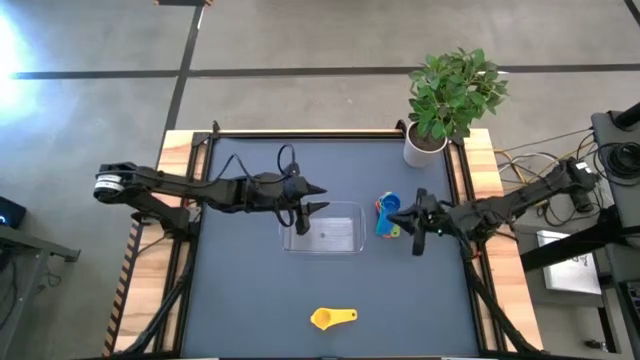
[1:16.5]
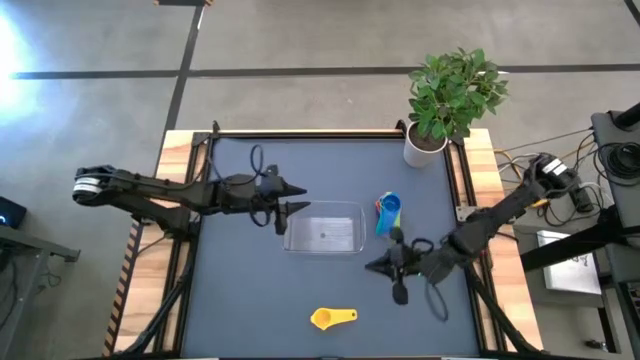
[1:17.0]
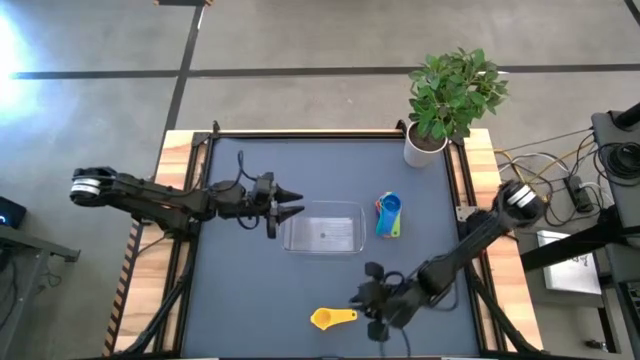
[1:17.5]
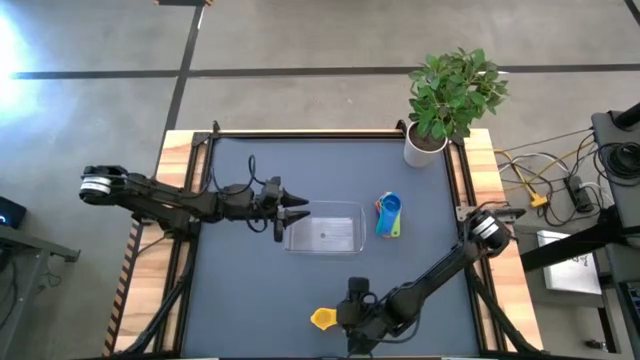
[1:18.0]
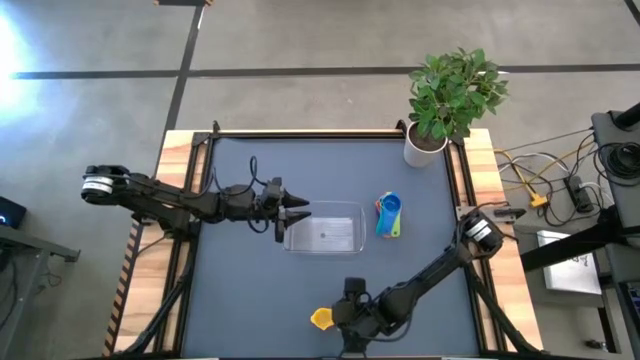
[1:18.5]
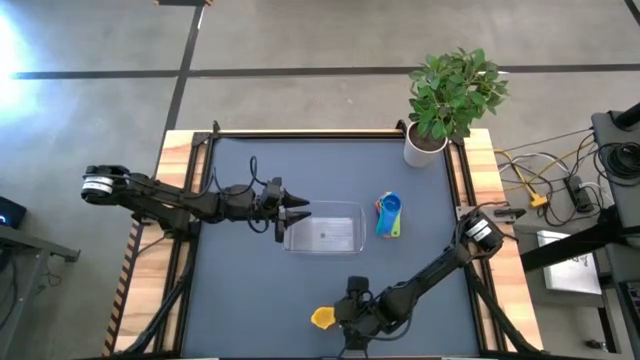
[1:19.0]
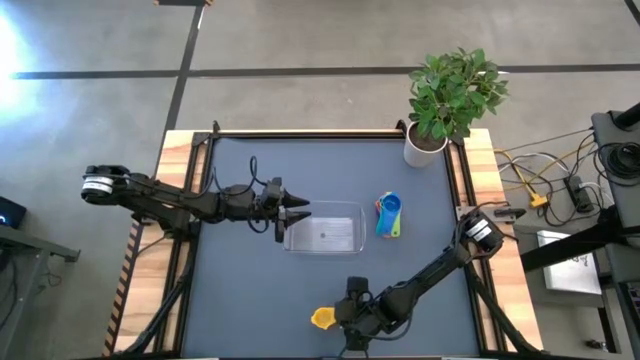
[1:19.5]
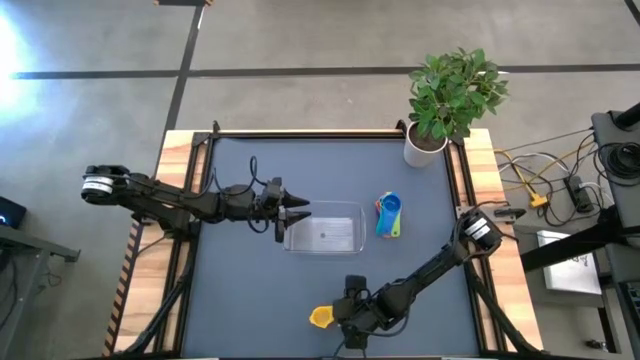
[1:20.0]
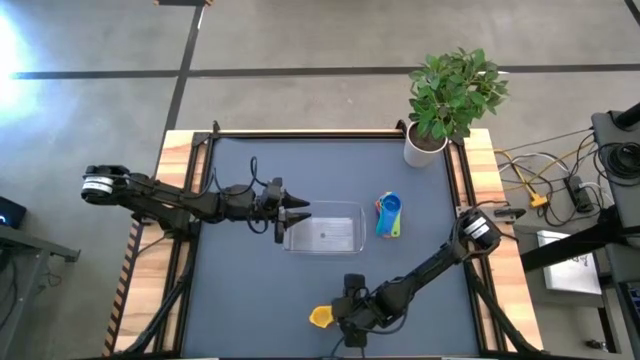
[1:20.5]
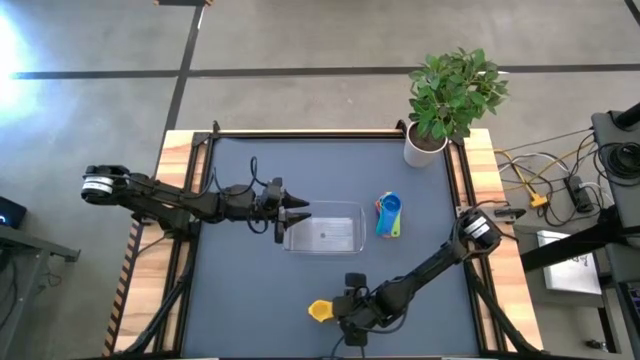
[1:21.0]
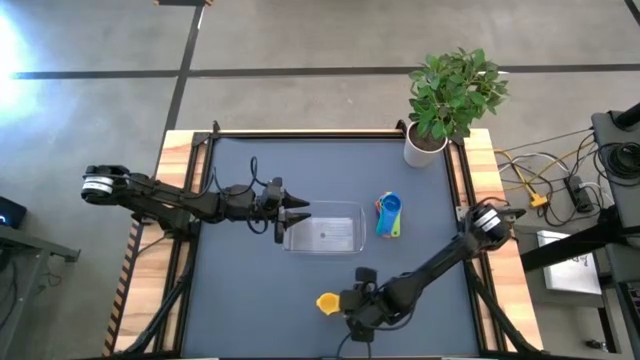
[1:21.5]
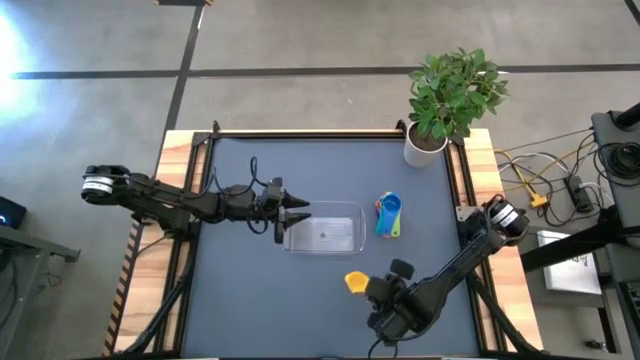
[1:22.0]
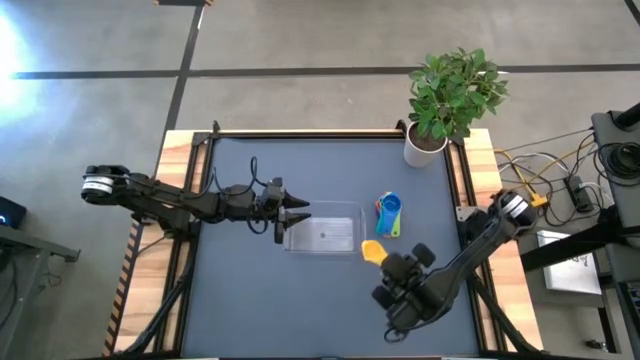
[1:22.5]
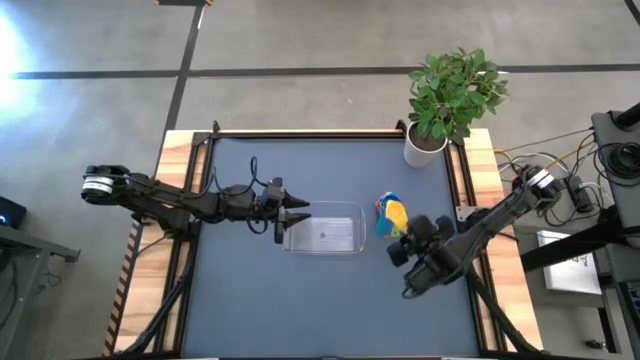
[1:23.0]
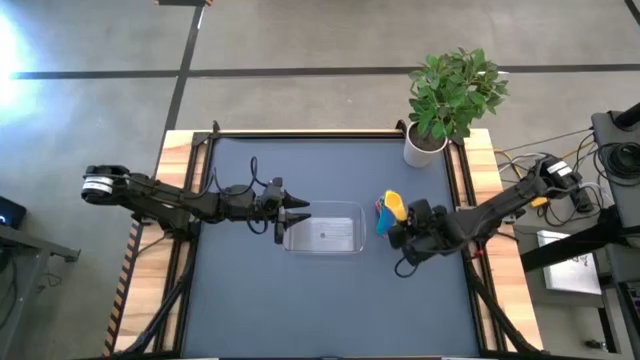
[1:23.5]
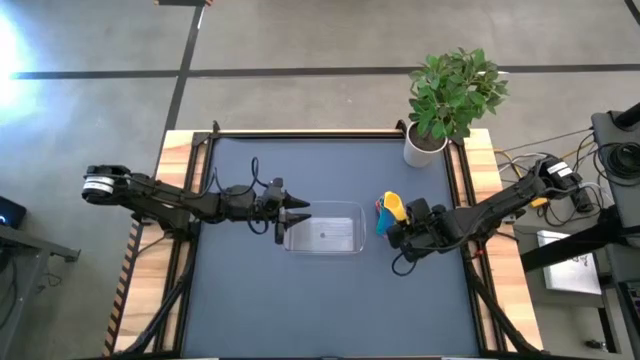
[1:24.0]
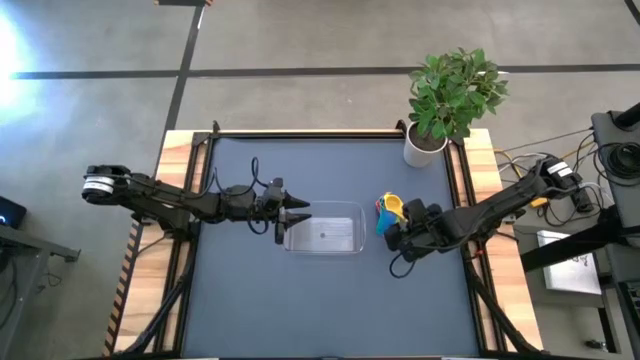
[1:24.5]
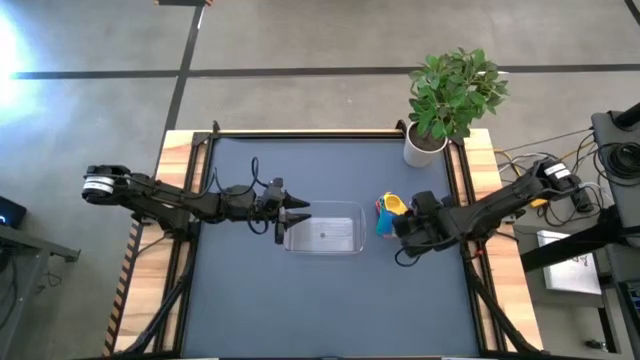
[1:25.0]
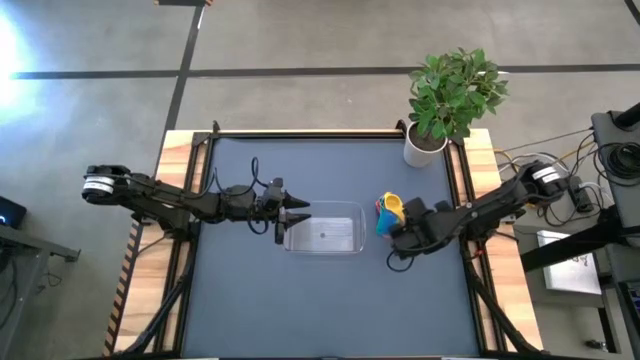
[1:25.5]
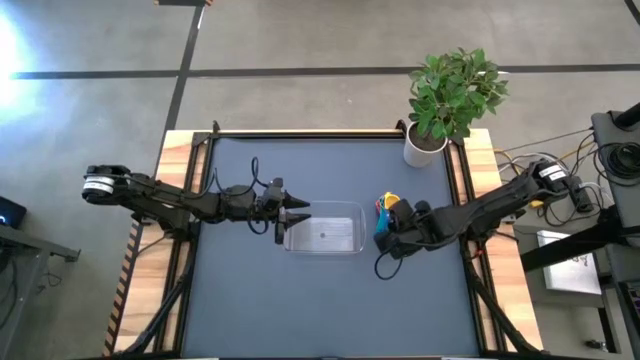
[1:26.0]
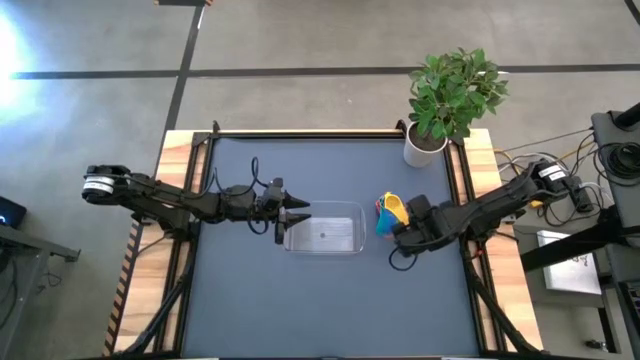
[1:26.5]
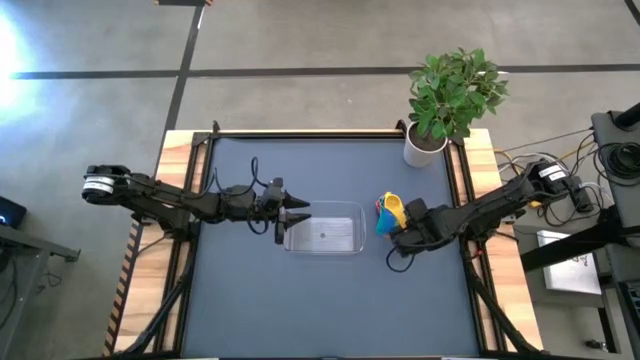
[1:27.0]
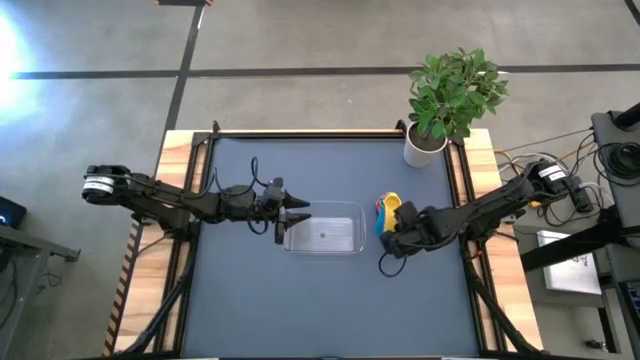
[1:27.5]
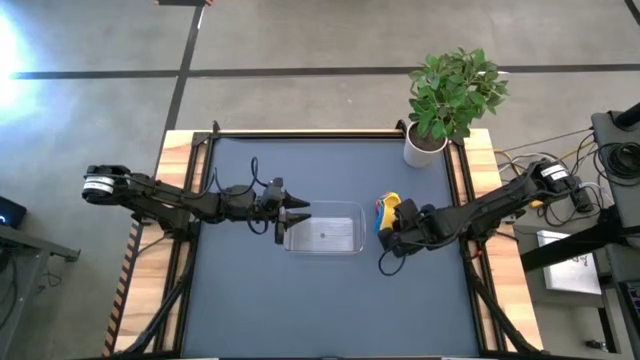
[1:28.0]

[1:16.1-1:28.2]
Task: Nest measuring cups in basket
Stack the yellow measuring cup on top of the blue measuring cup

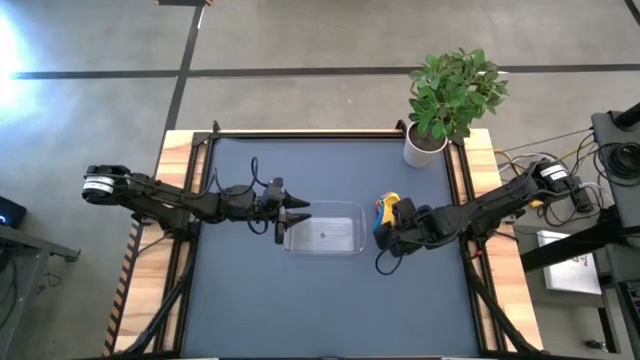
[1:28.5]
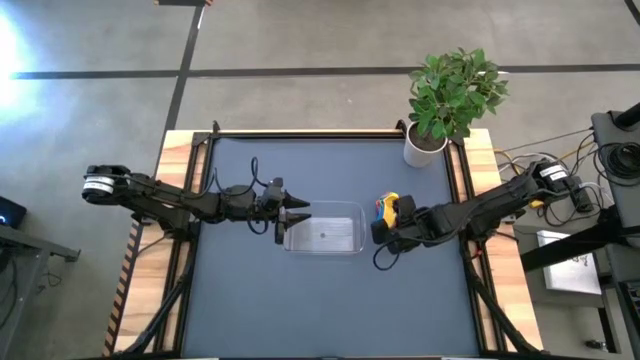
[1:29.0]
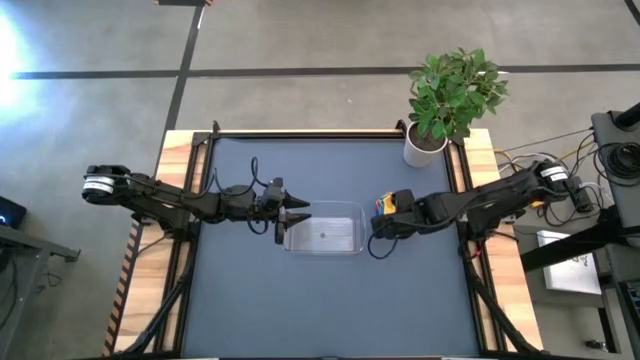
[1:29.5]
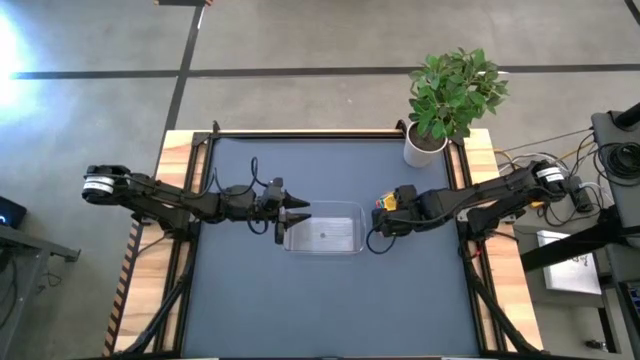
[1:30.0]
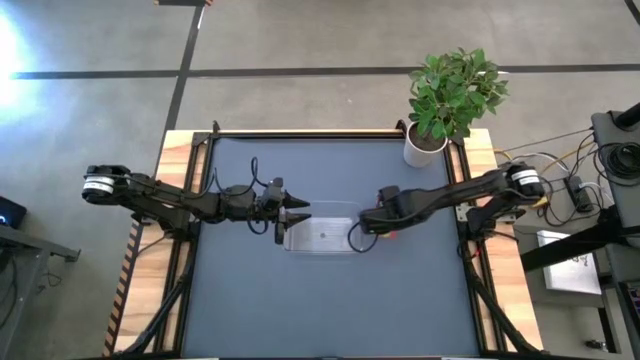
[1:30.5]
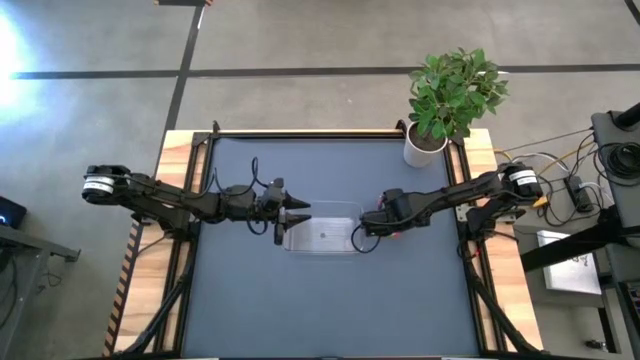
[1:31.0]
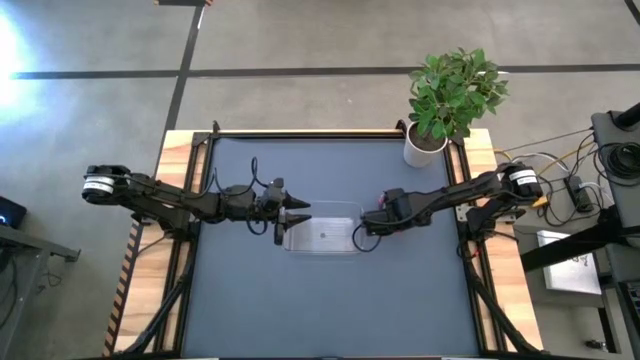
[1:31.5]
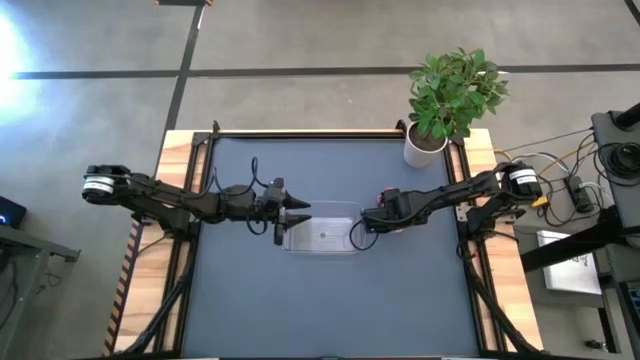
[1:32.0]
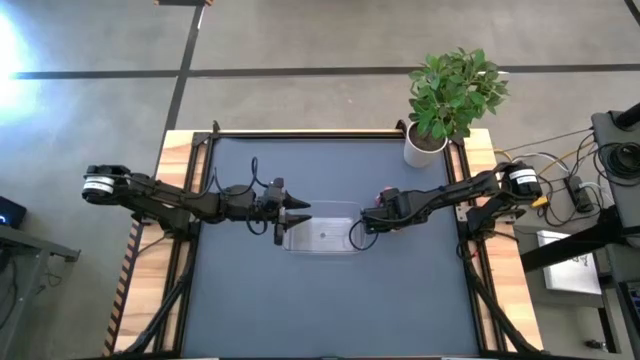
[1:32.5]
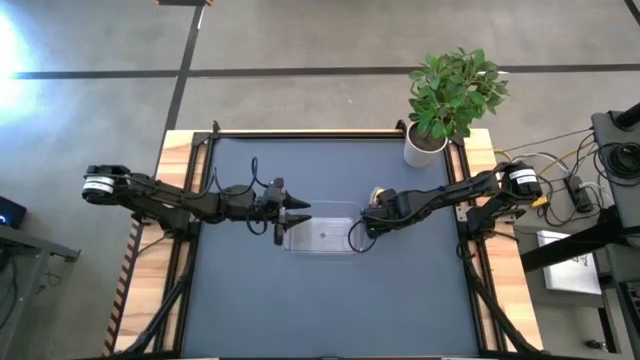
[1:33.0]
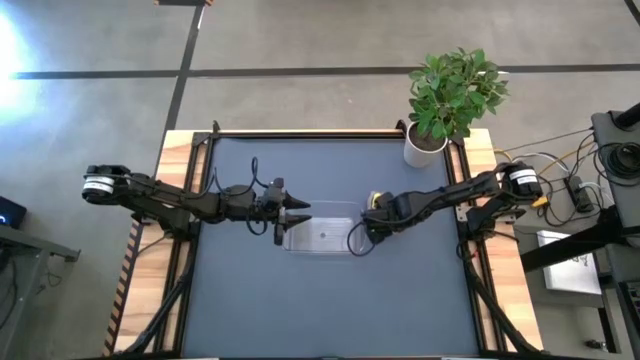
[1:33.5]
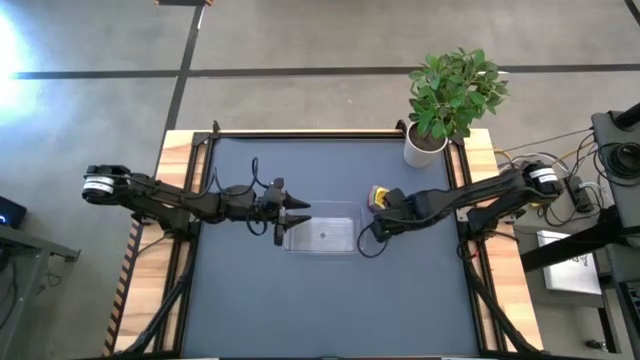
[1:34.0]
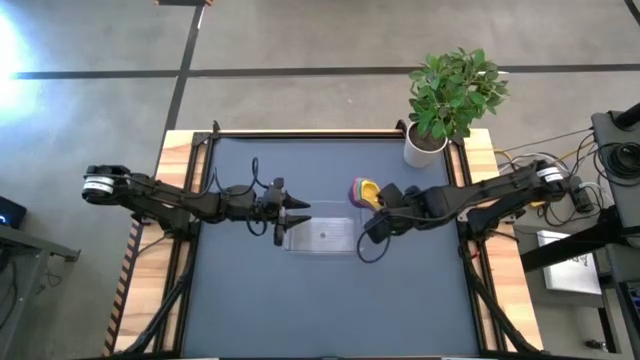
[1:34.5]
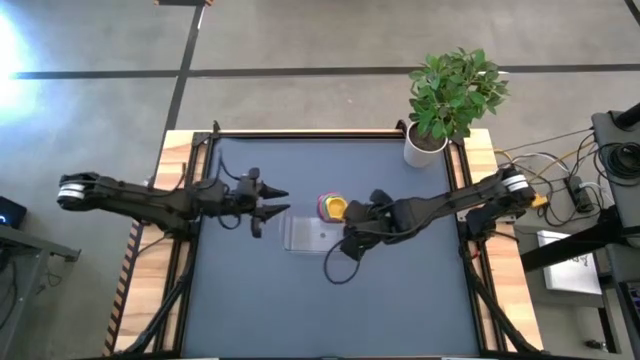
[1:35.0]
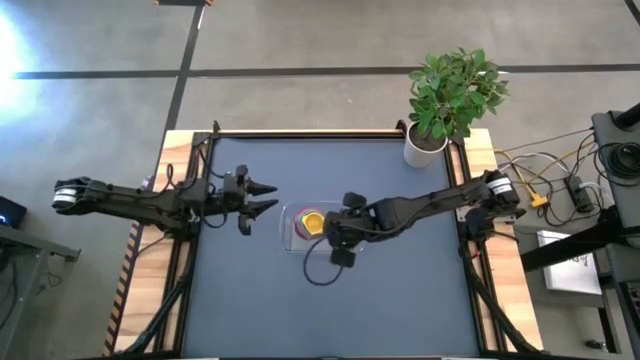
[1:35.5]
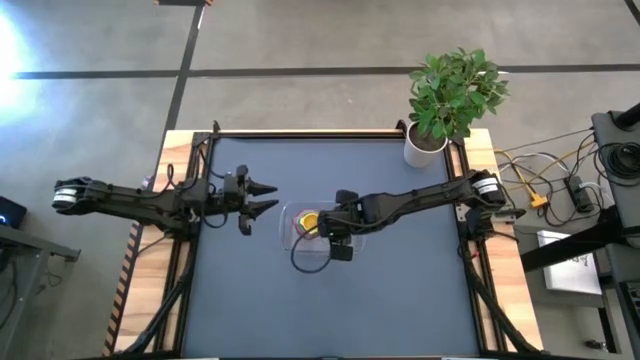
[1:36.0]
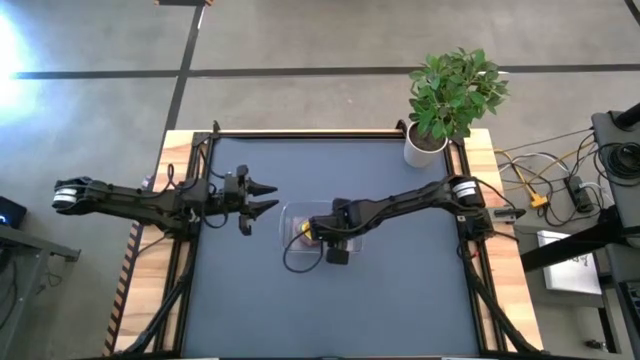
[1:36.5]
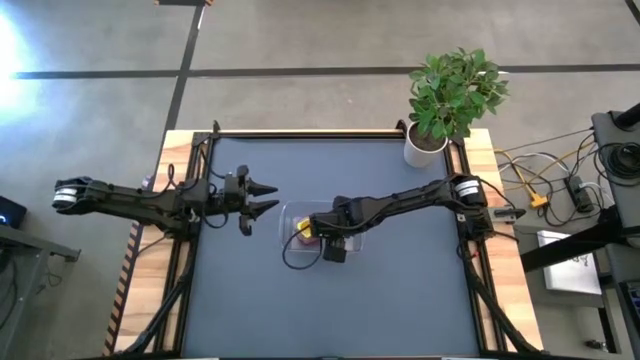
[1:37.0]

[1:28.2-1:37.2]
Put the nested measuring cups into the transparent bin
